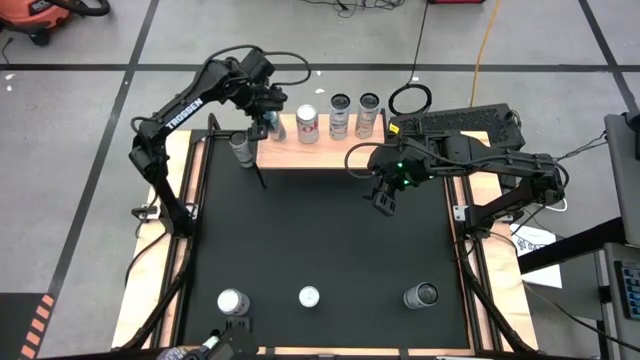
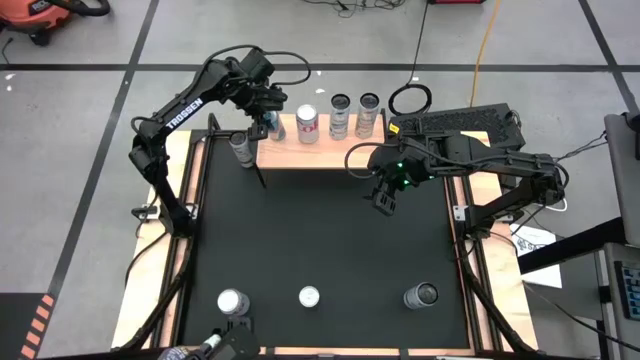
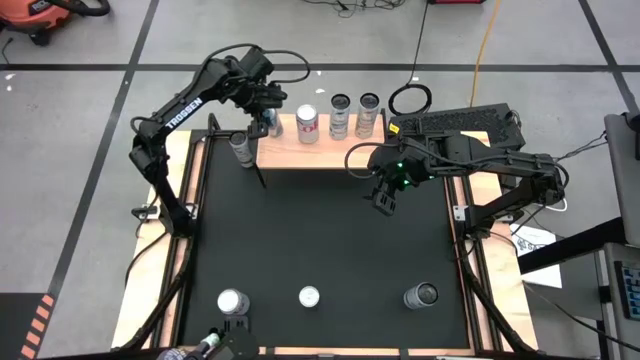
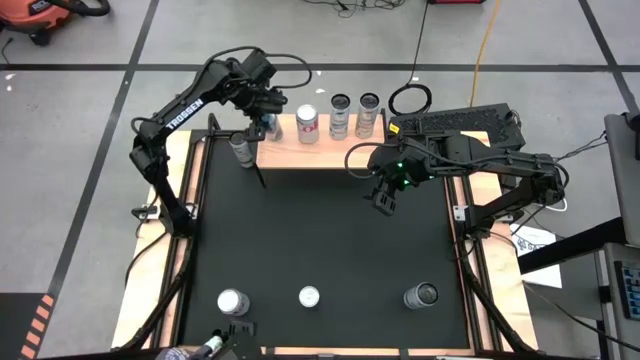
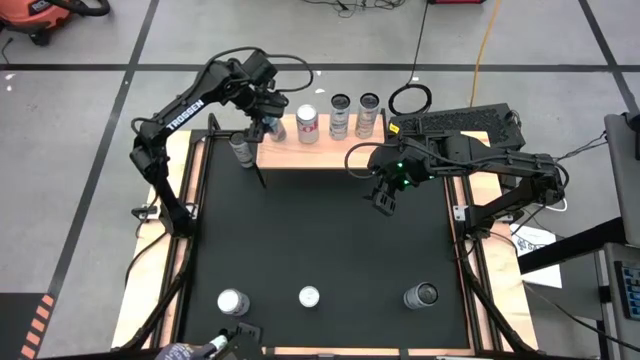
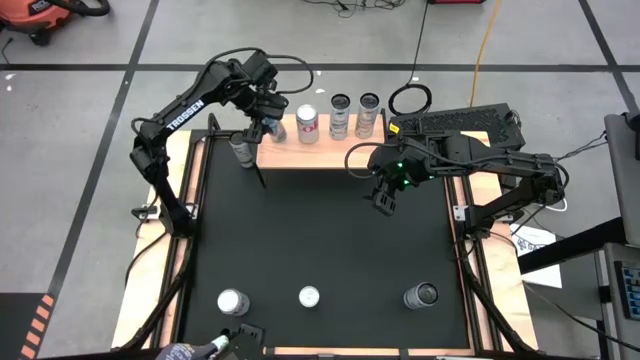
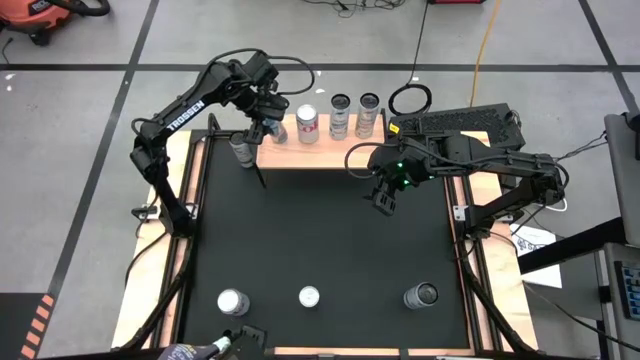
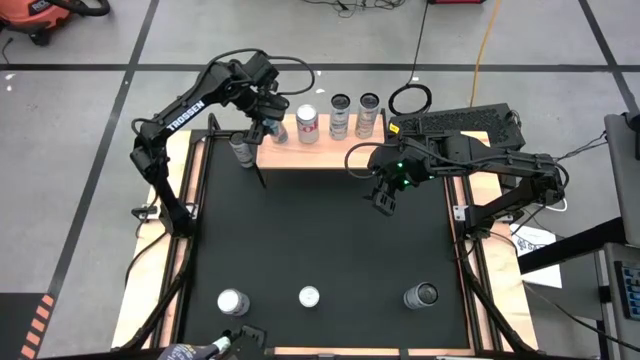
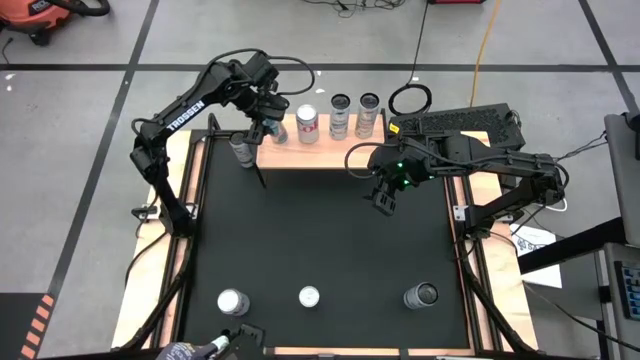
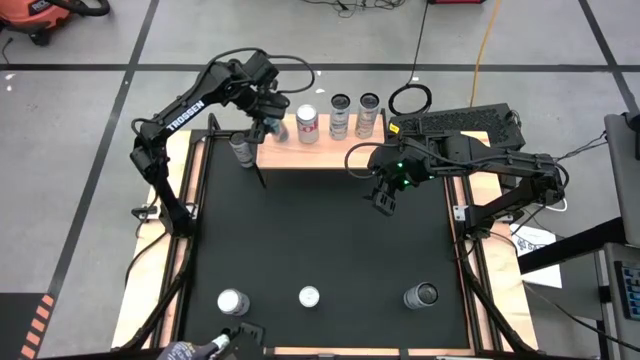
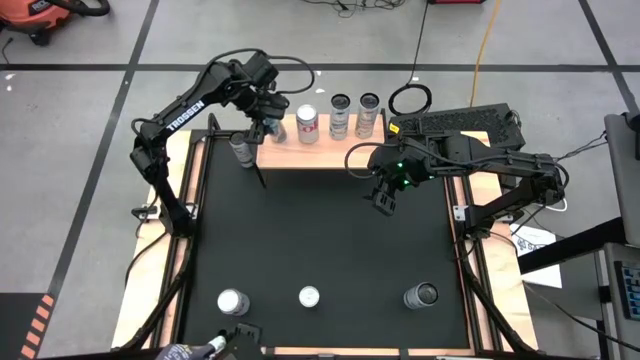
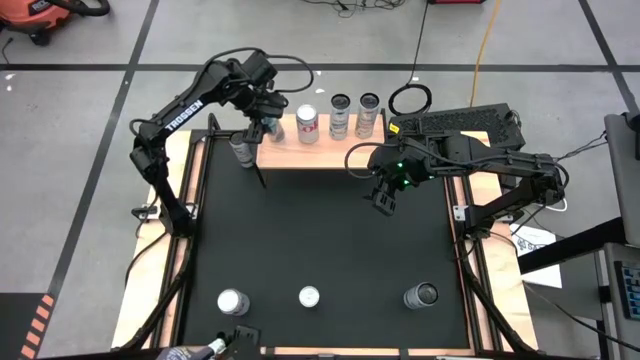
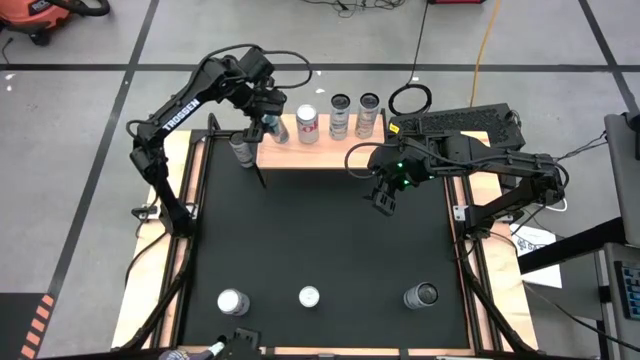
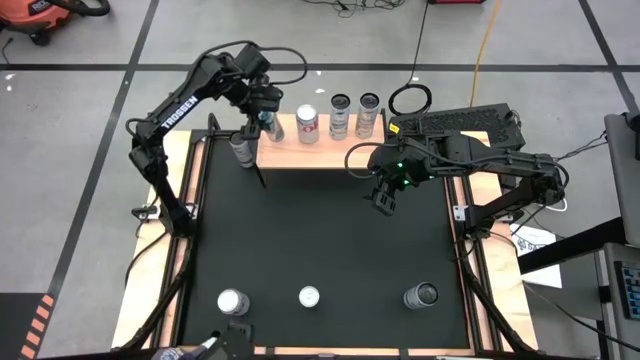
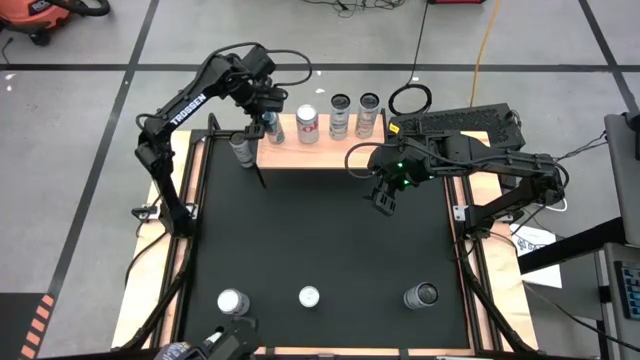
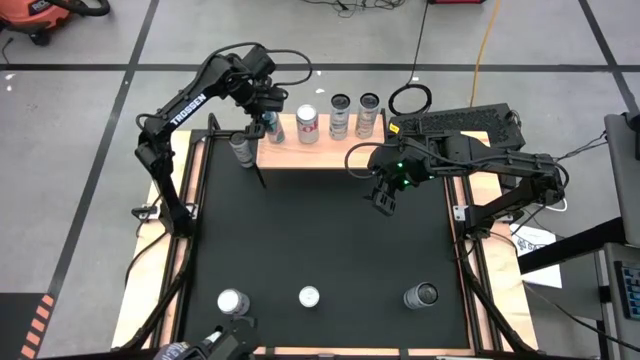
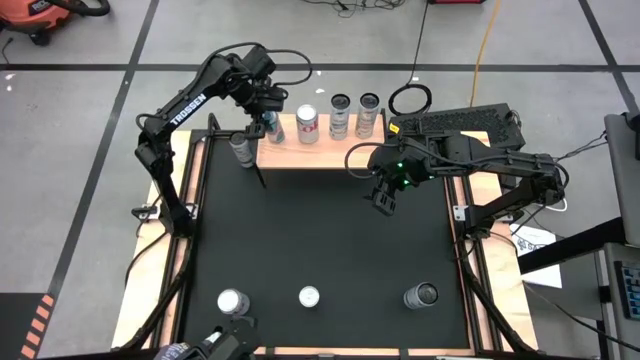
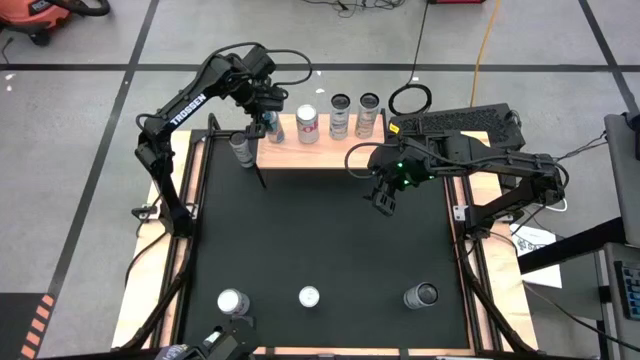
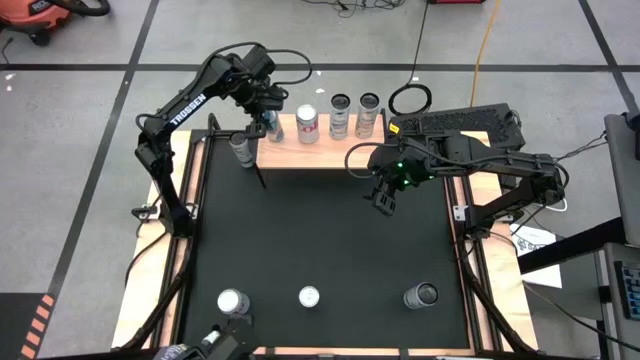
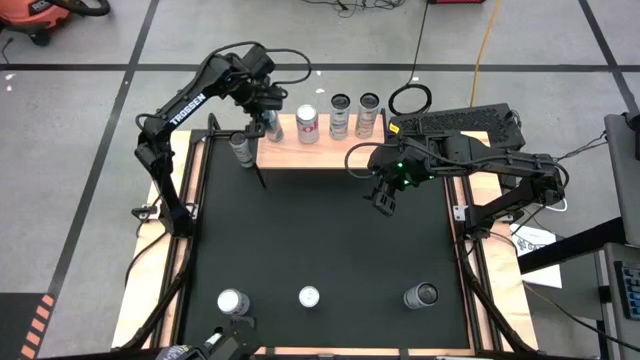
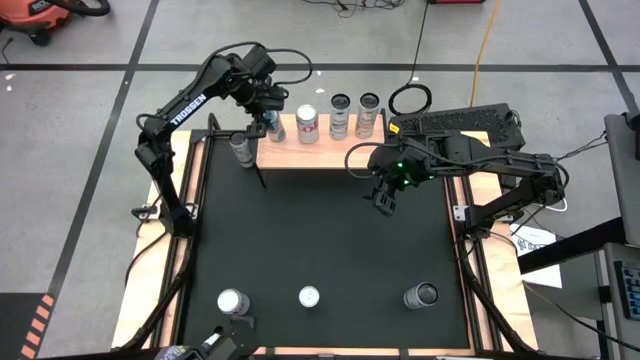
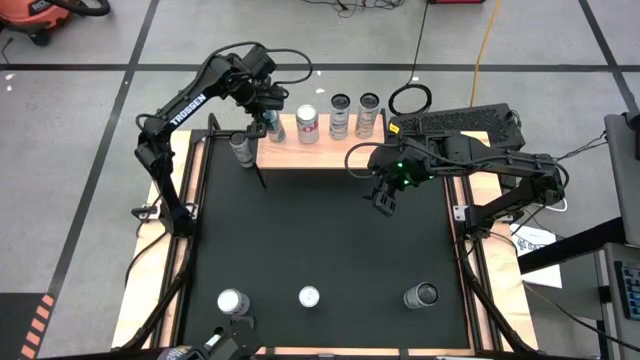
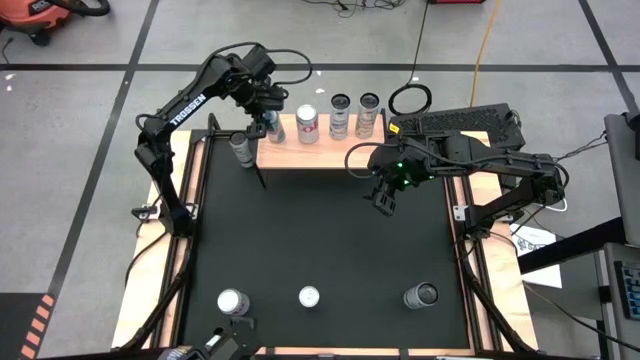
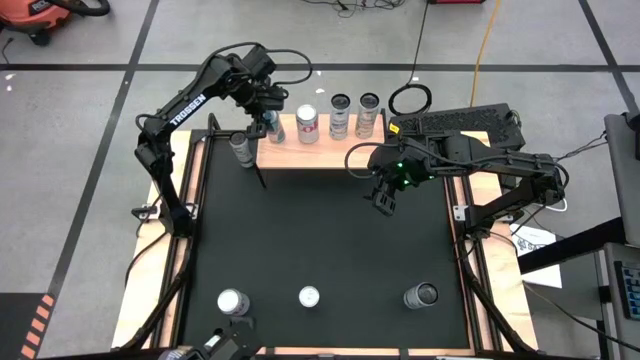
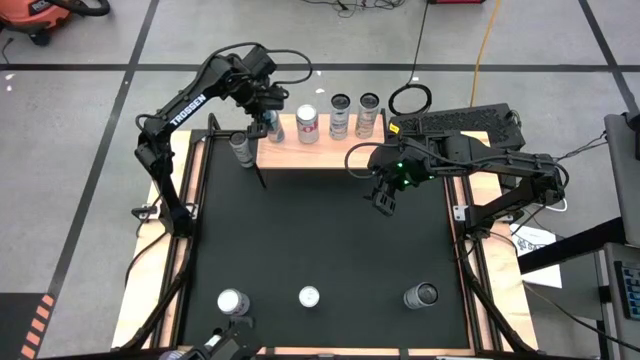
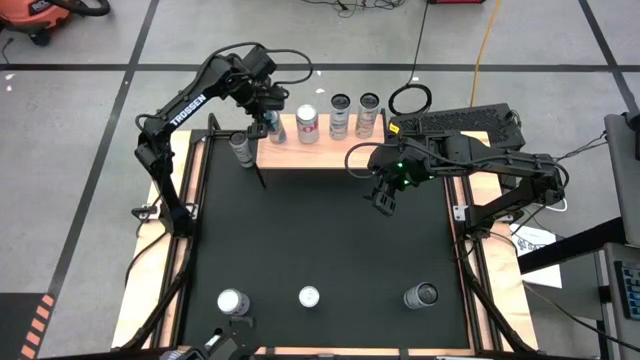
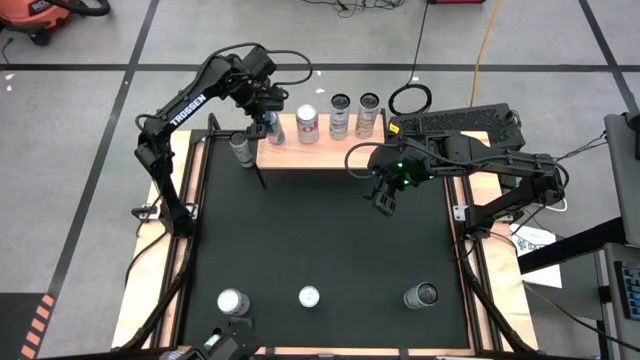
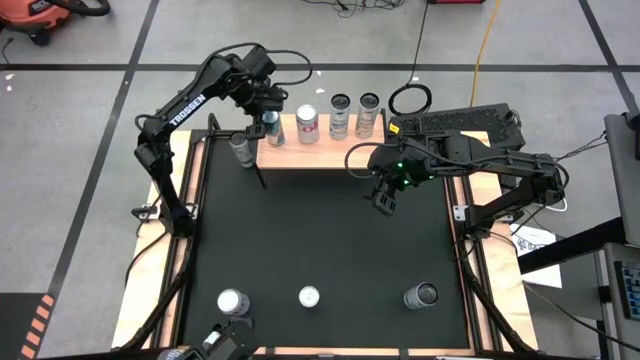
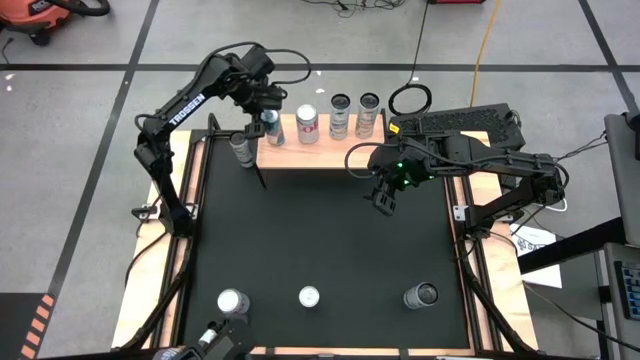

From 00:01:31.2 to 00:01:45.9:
Task: Place canned beverage on shelf
Put the left blue soda can on the shelf

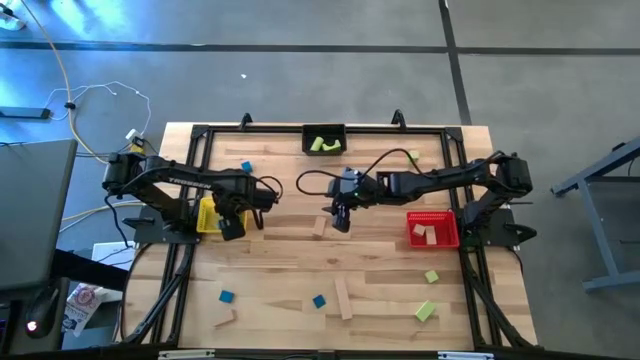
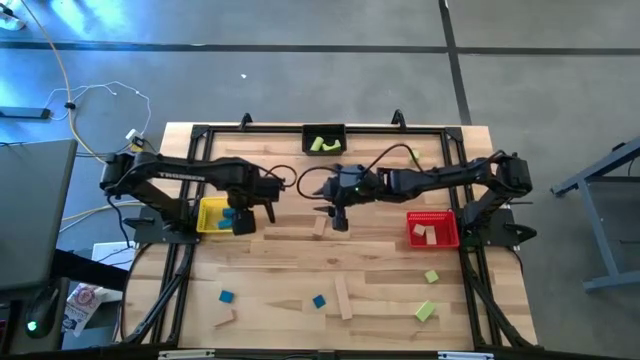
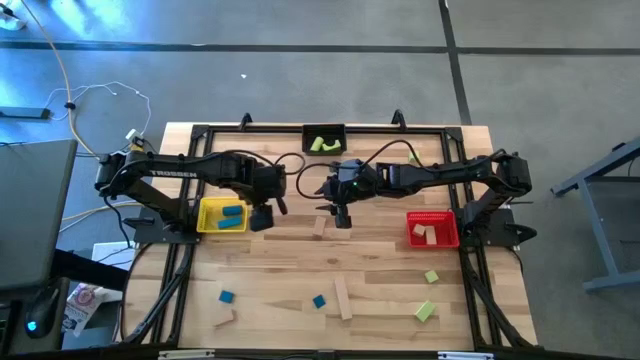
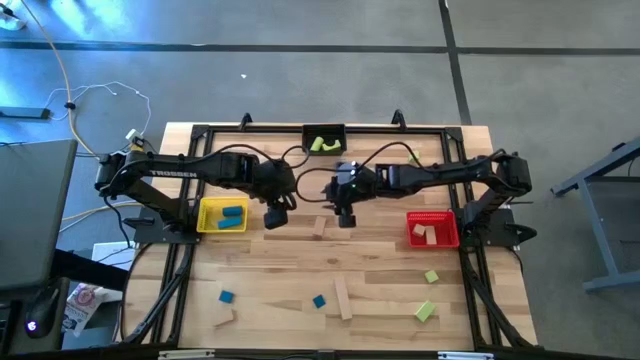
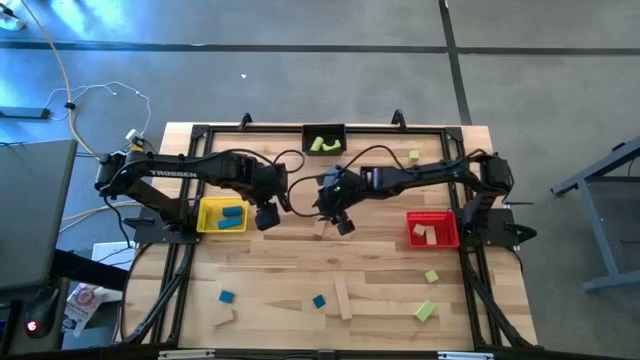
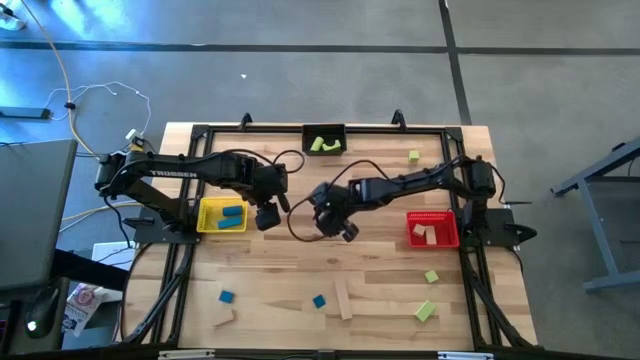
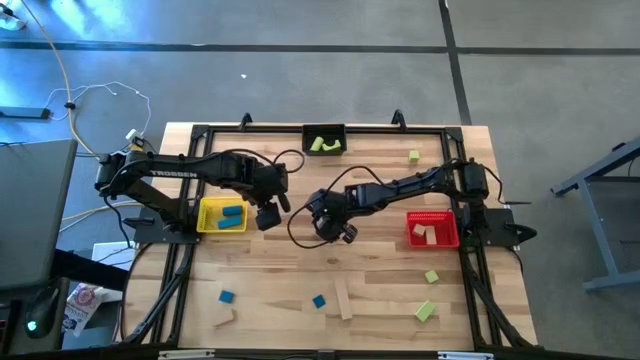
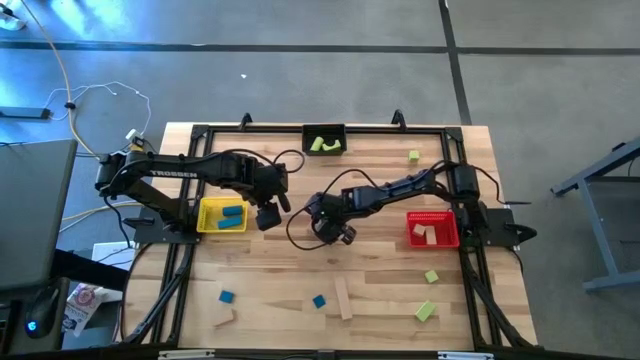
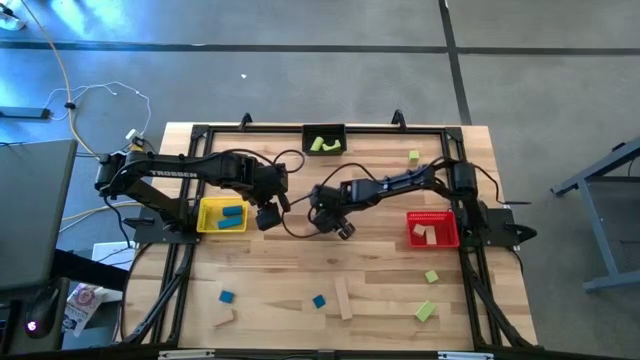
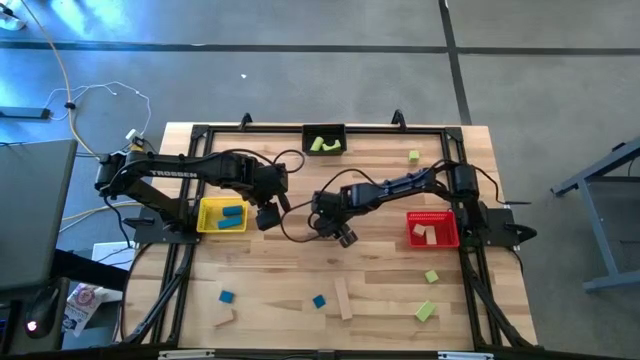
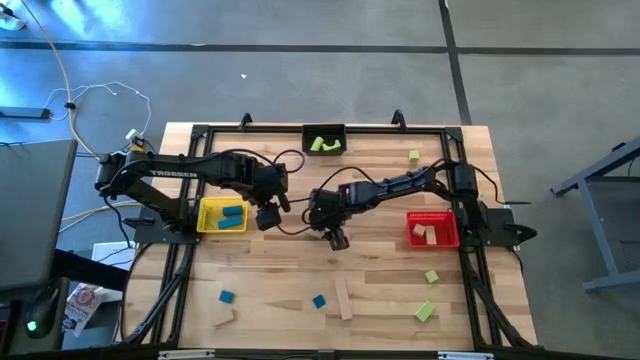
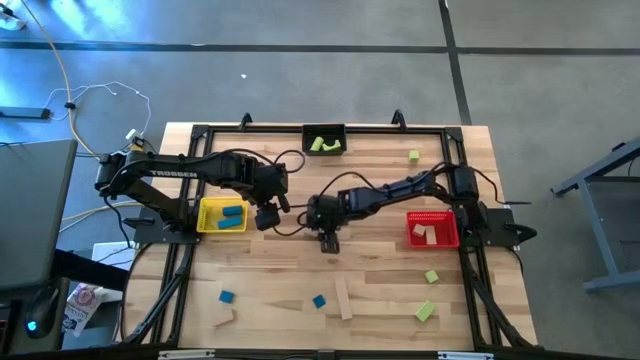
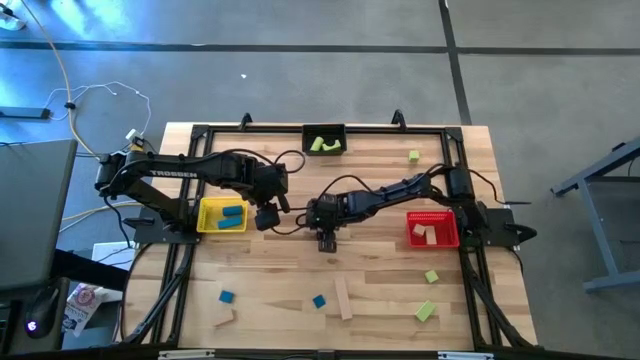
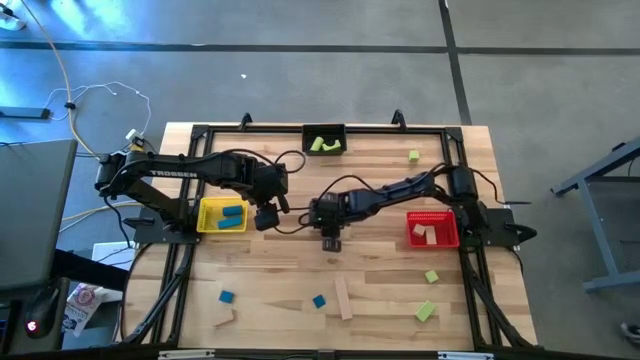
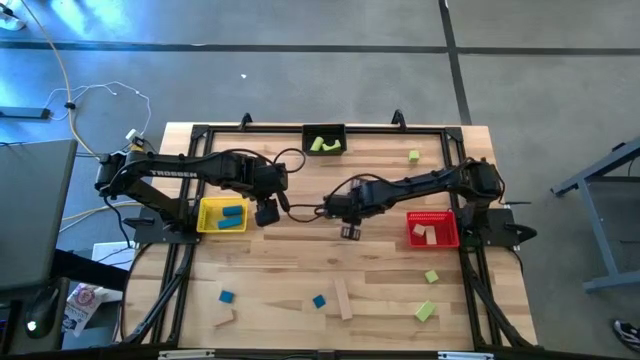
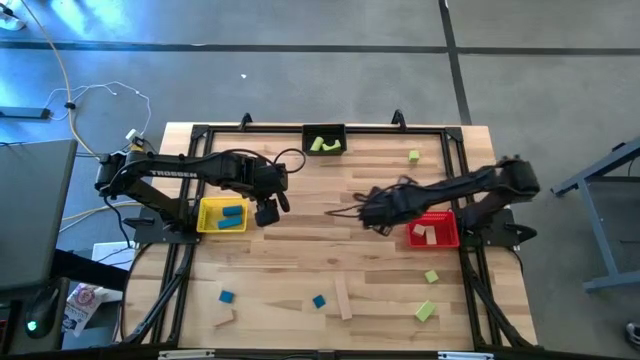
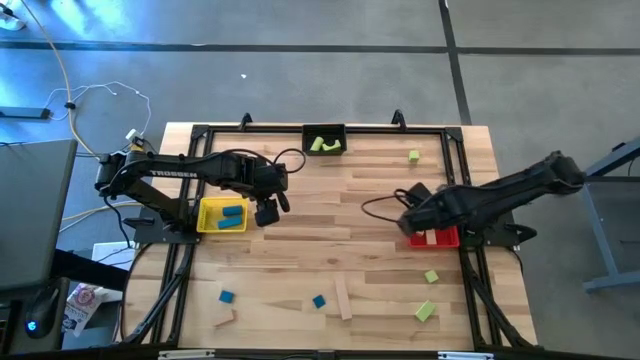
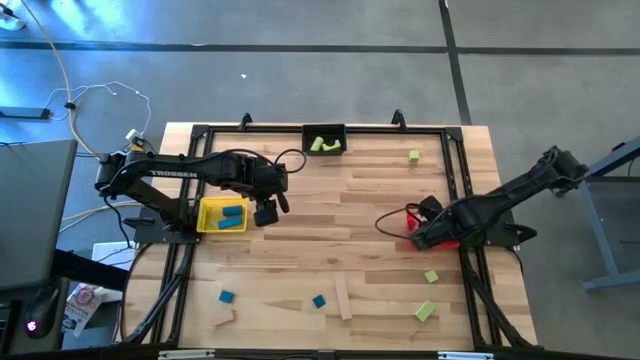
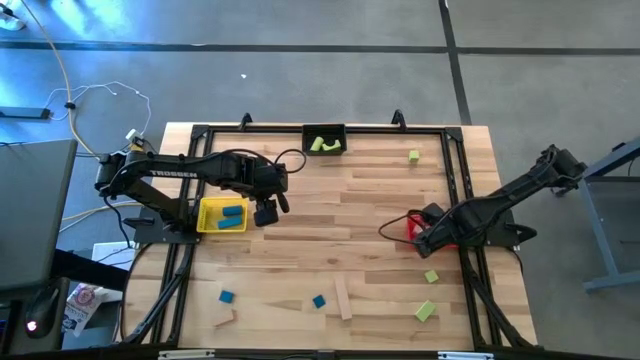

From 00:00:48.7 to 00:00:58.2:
Task: Sort & place blocks by color
Put the light brown block into the red bin
